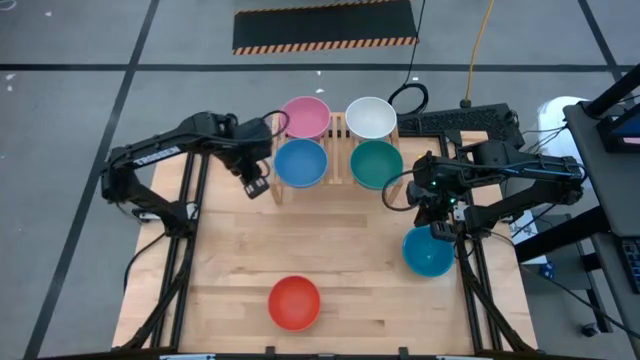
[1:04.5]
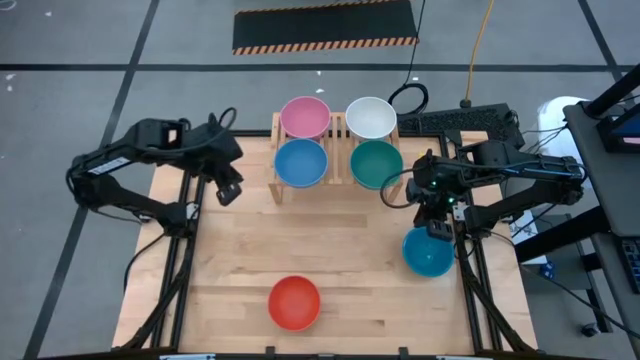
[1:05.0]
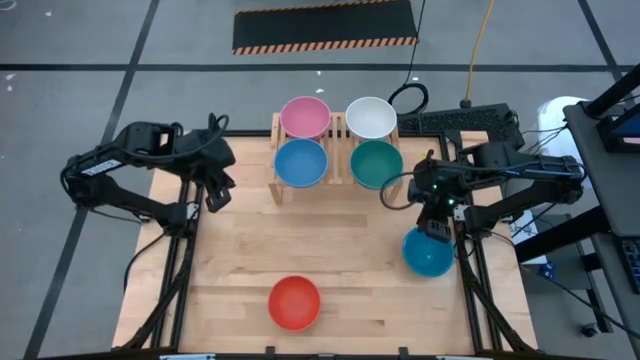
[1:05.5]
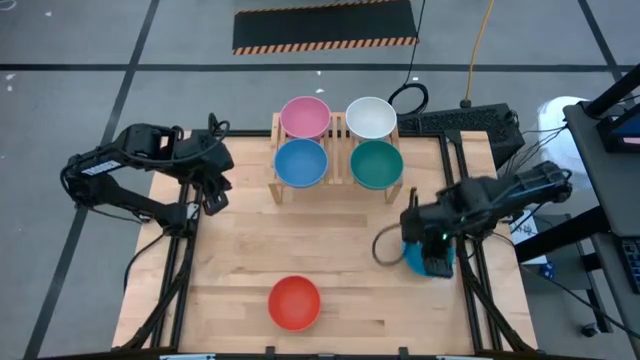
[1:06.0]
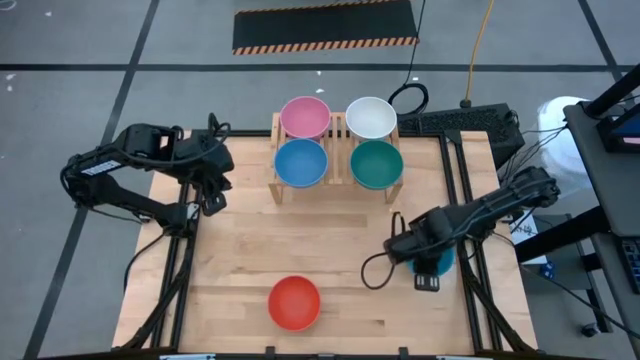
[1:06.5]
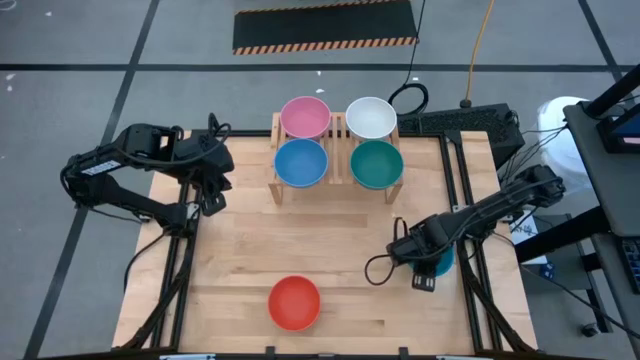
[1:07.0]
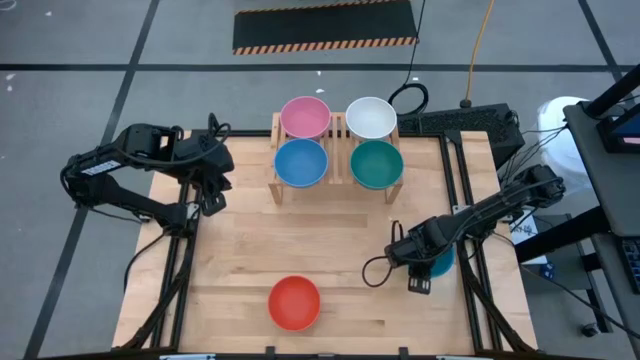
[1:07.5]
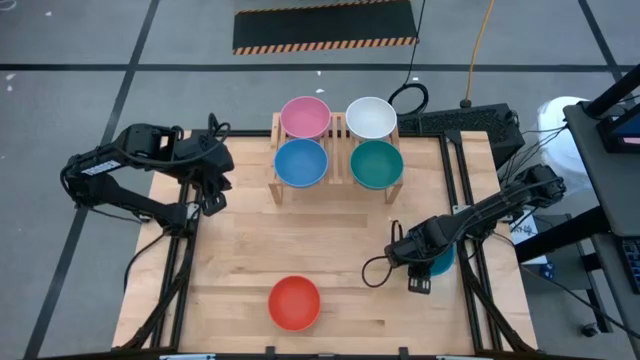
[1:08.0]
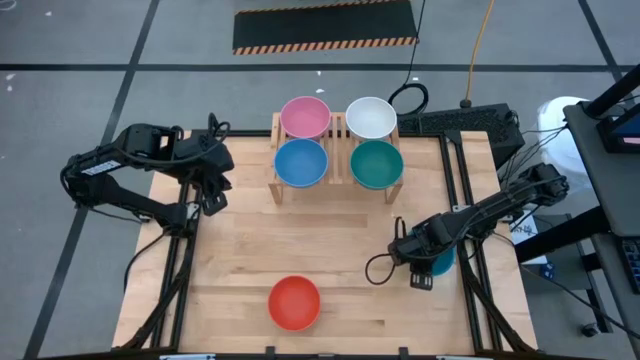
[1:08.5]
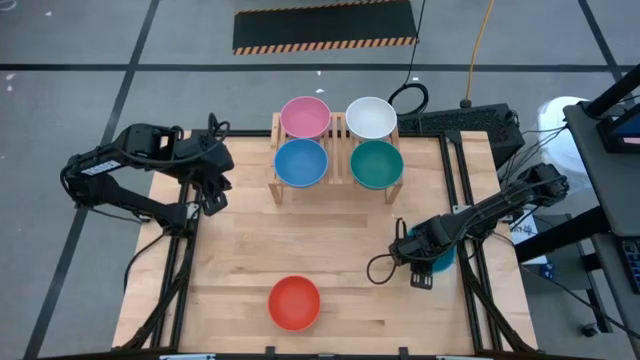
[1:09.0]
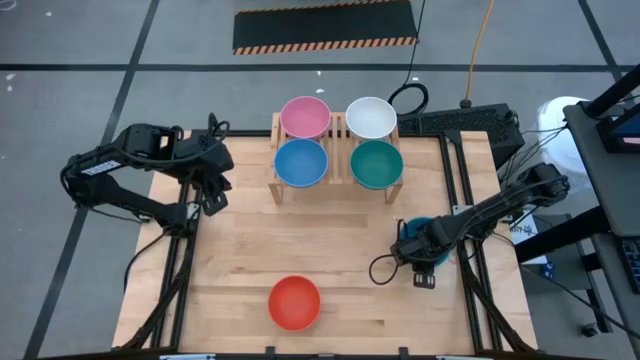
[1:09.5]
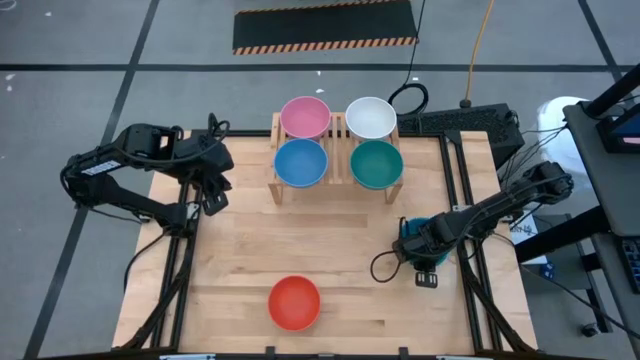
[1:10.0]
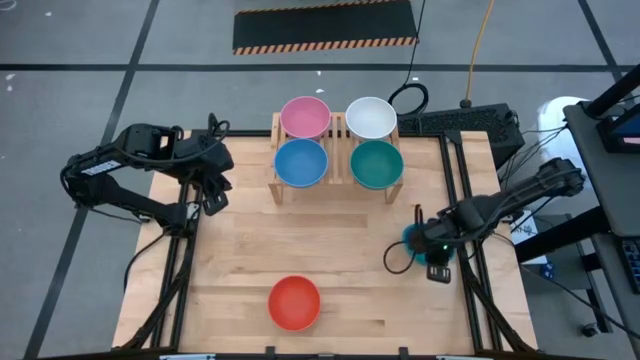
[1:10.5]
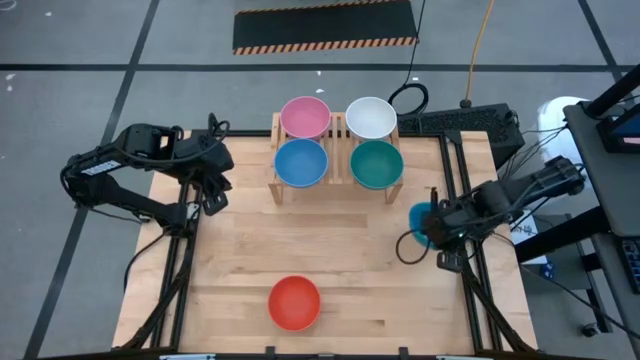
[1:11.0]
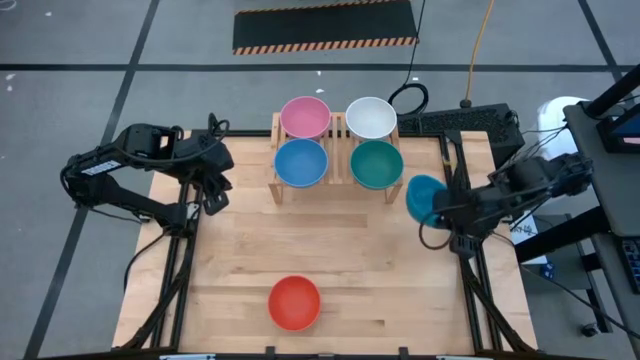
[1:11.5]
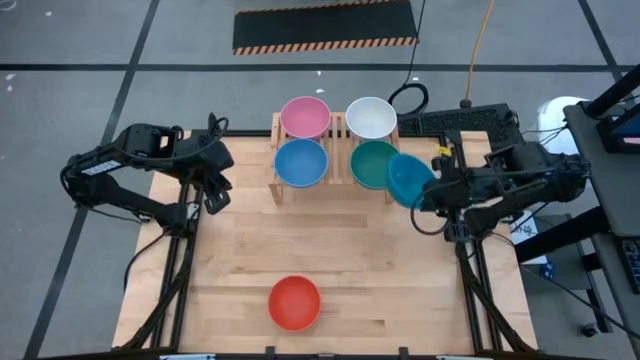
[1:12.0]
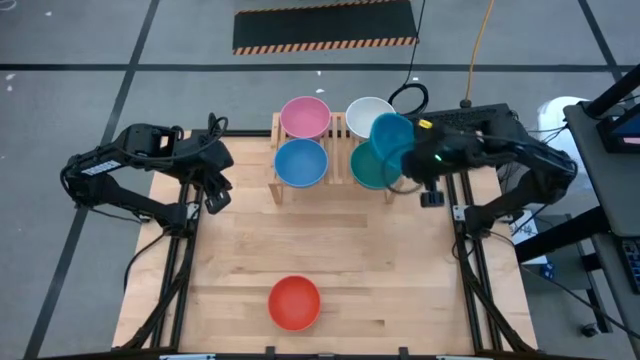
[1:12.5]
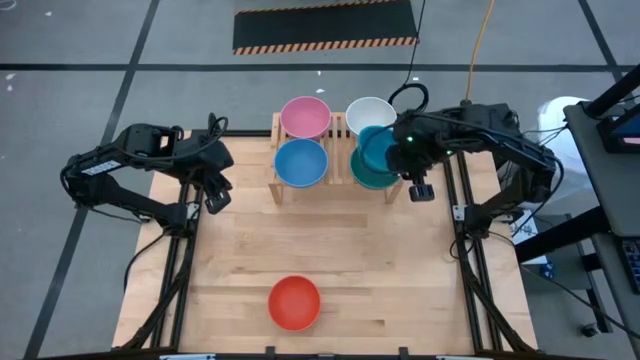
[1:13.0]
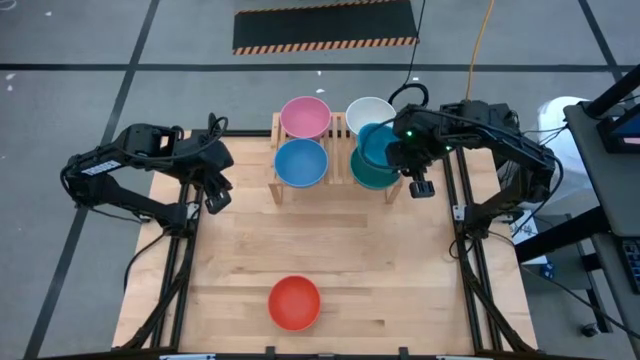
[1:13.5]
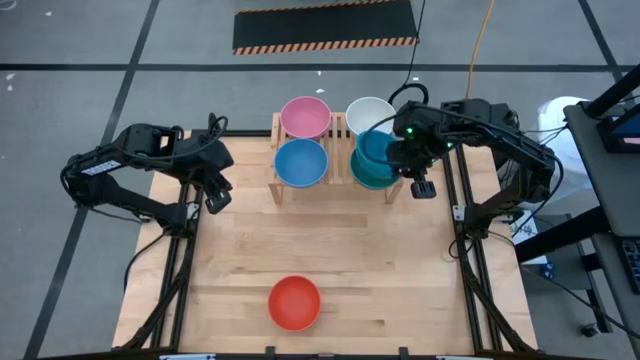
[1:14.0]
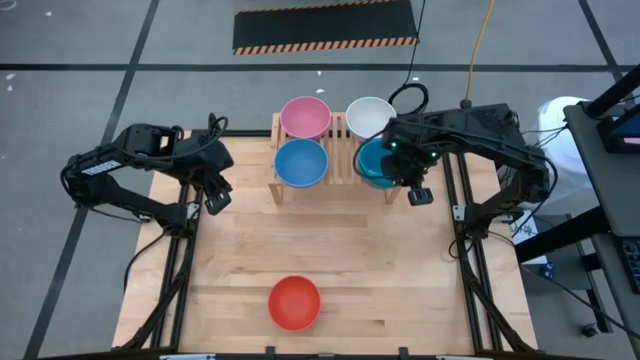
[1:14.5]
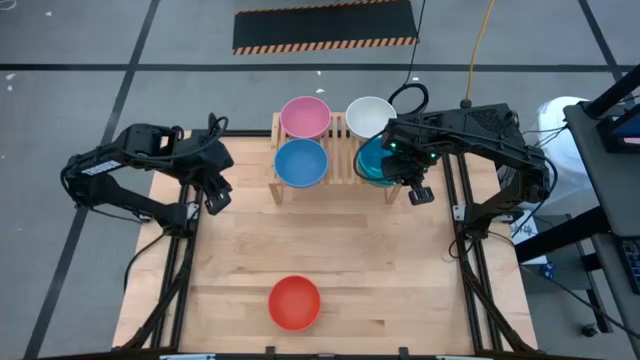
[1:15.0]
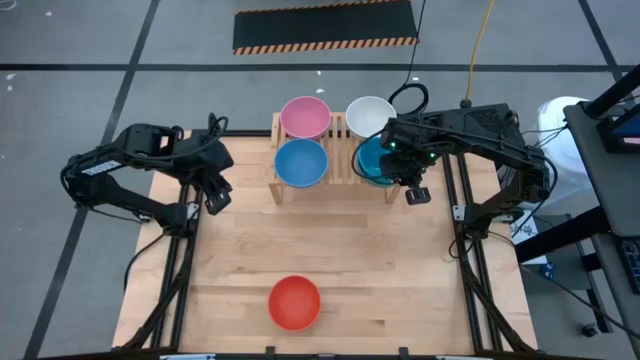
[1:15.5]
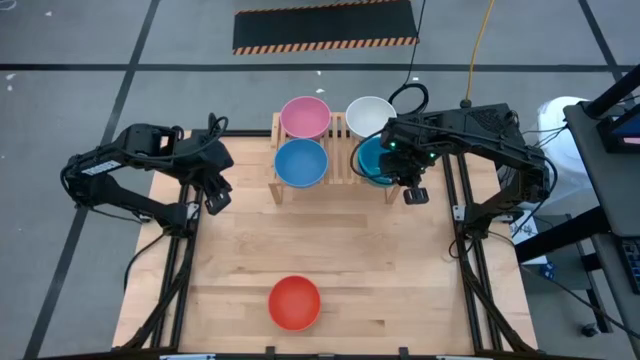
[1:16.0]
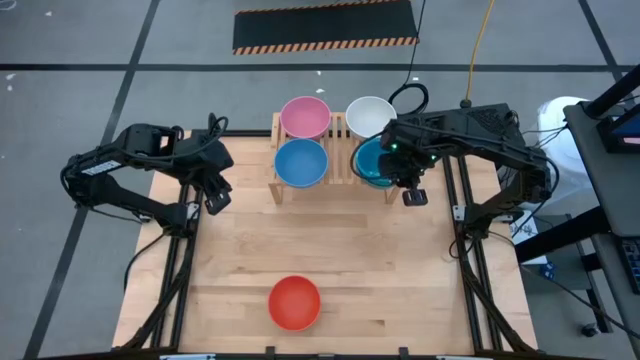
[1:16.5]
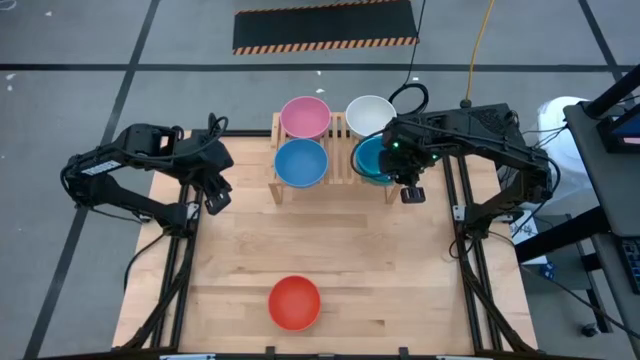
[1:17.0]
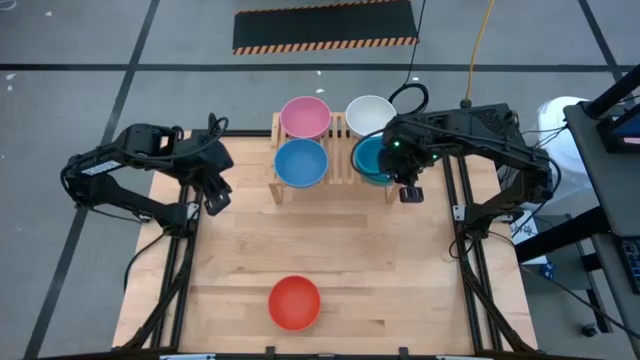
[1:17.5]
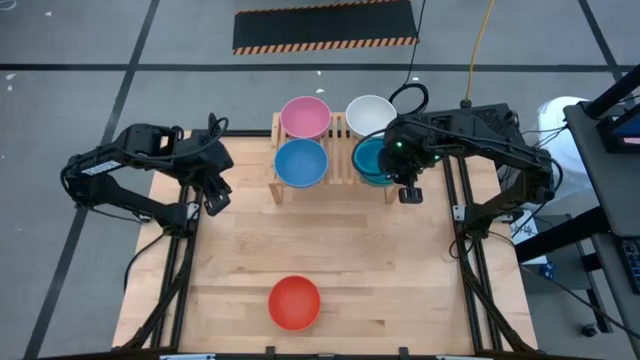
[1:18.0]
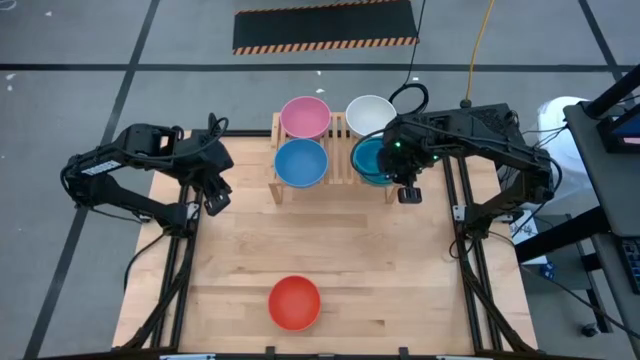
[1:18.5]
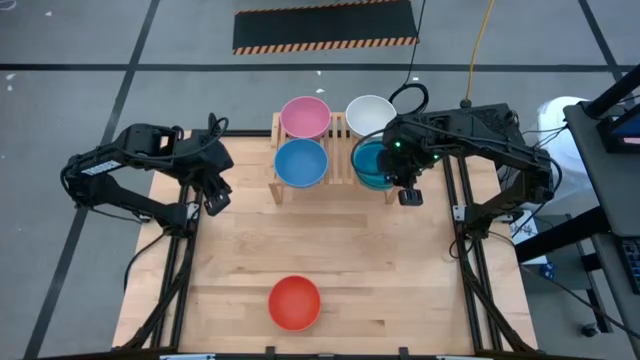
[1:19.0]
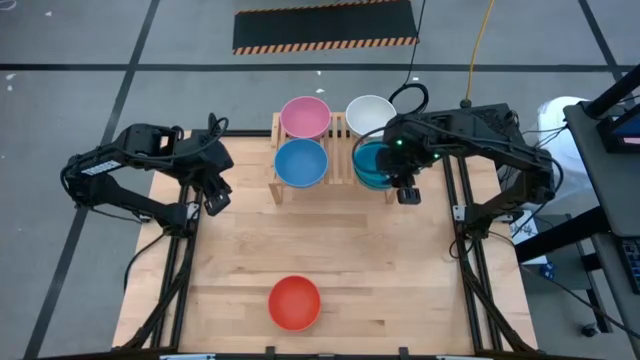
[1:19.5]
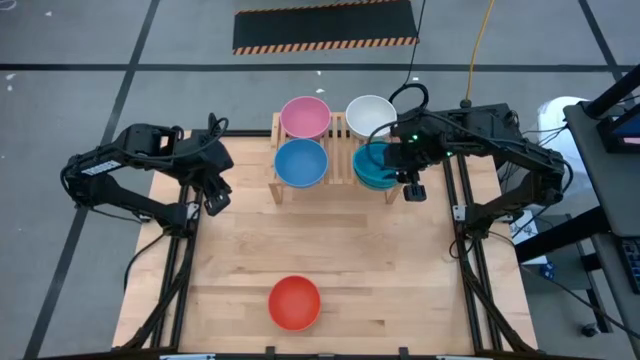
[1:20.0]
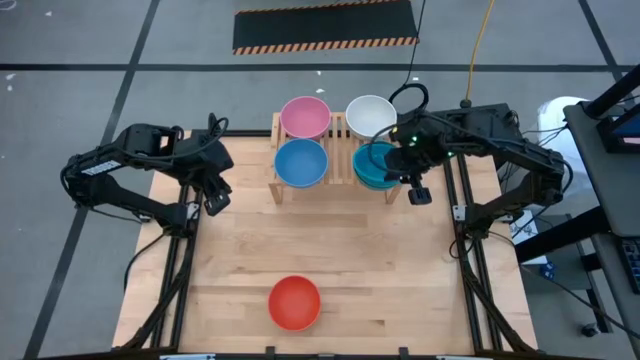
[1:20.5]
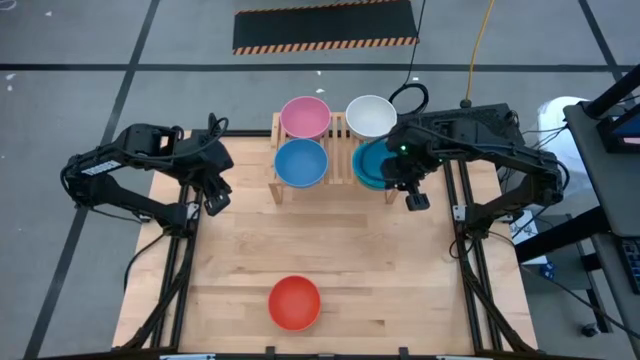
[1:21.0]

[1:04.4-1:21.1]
Task: Place and stack bowls onto a shelf
Stack the blue bowl on top of the green bowl on the shelf

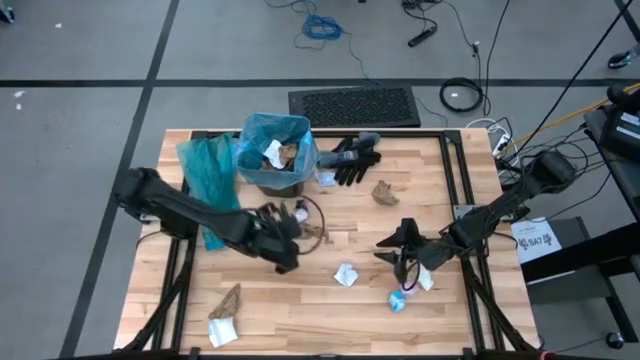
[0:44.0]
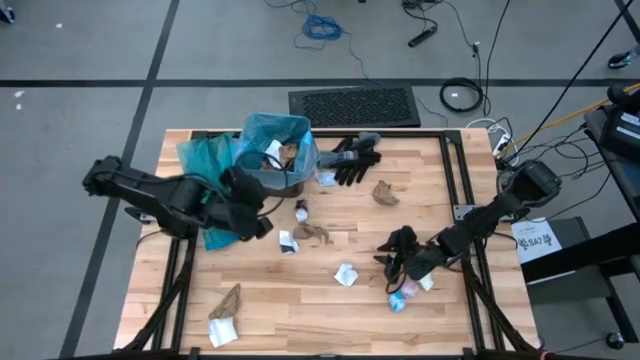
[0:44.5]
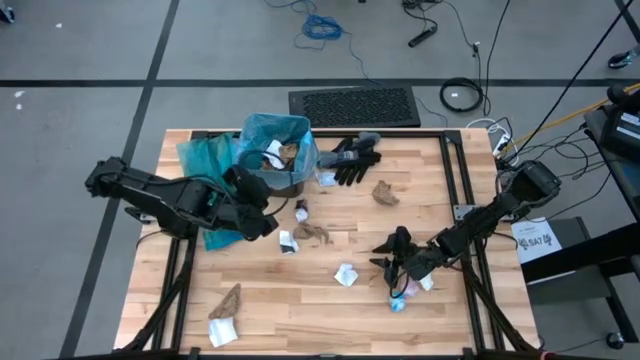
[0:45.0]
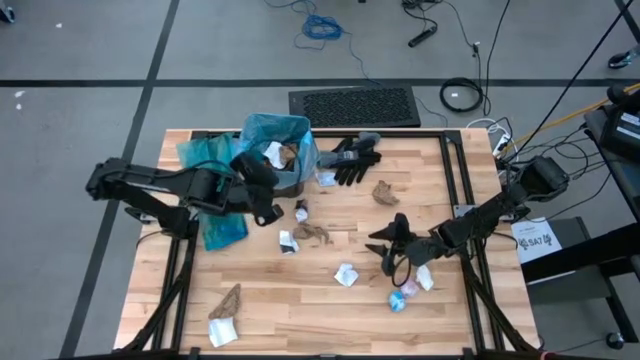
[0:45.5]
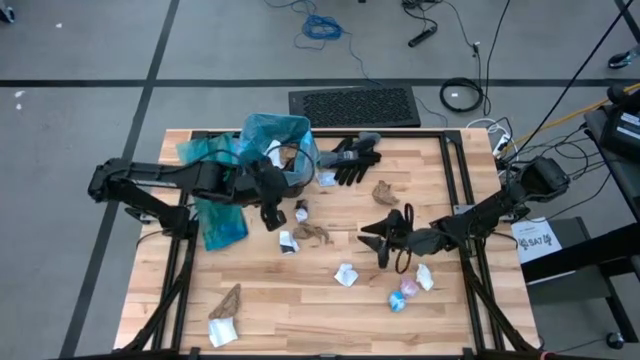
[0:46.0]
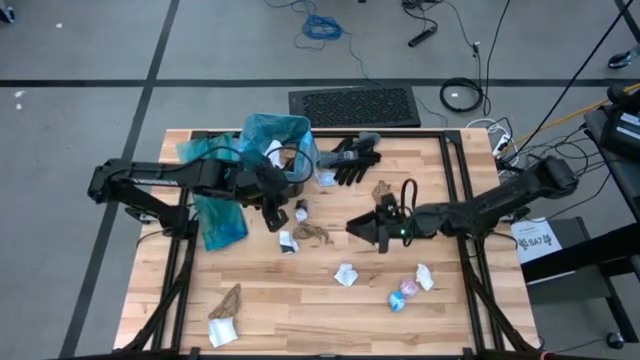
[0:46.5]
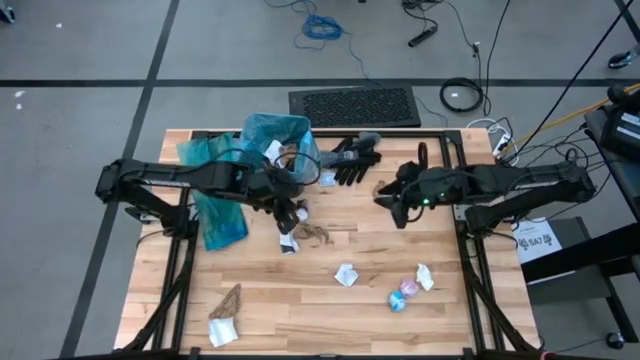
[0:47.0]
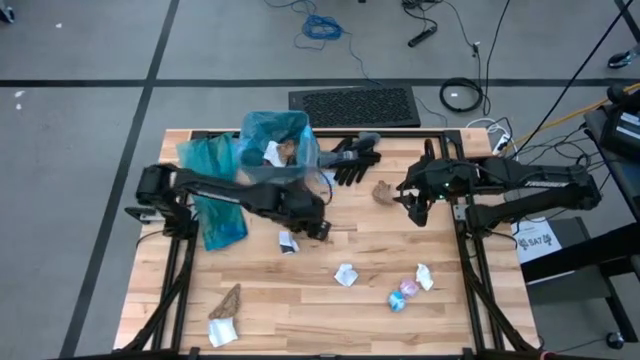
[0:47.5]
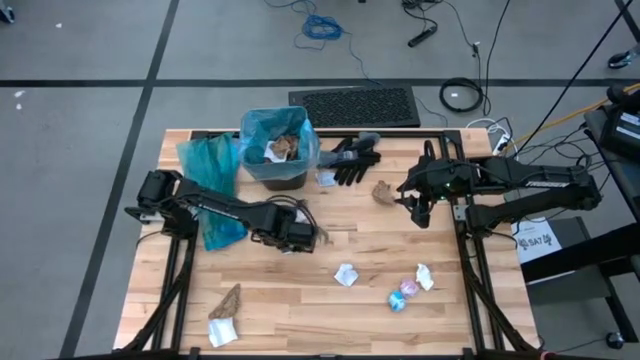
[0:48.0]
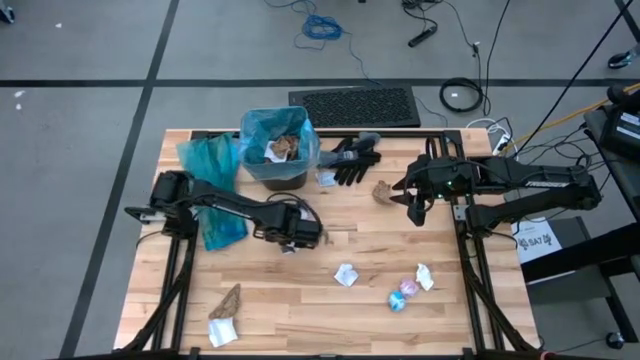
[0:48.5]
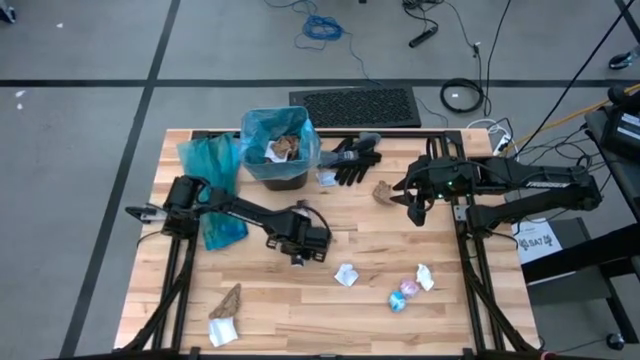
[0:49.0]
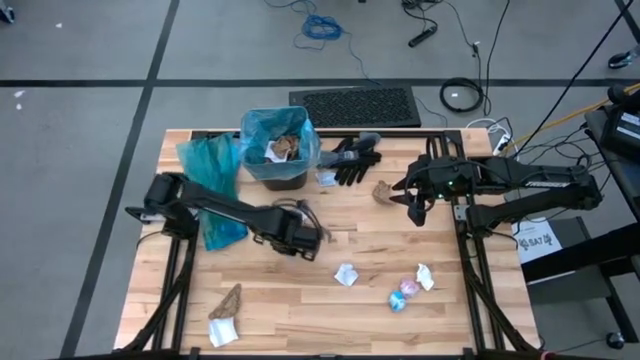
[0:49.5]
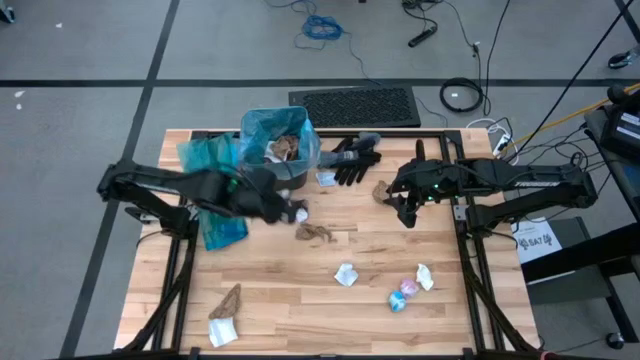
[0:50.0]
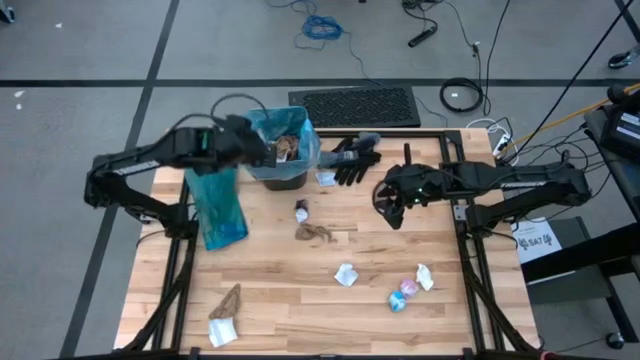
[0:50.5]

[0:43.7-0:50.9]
Task: place trash/remove bag and relplace
Put the white cardboard into the trash bin
